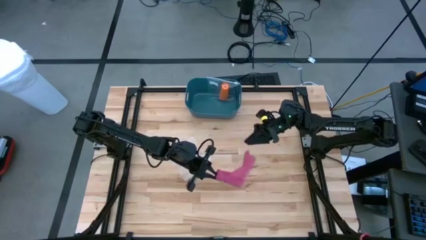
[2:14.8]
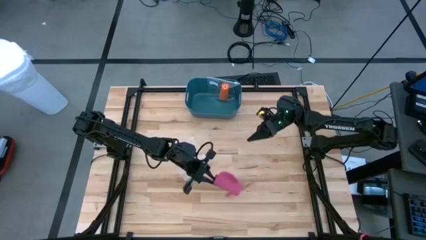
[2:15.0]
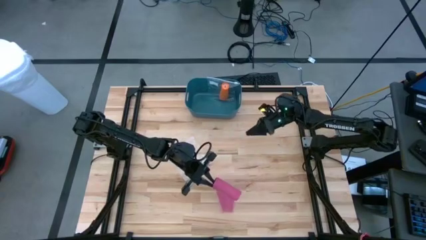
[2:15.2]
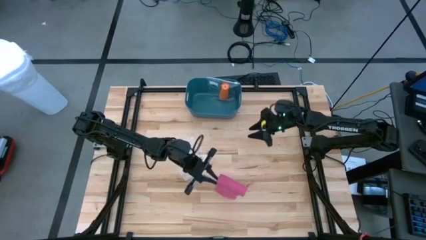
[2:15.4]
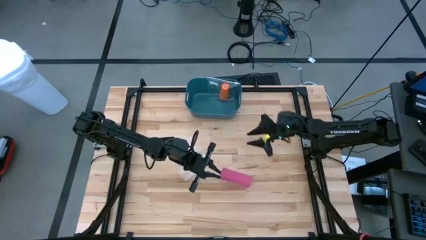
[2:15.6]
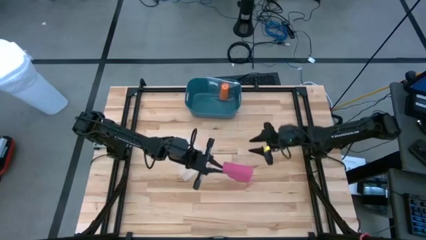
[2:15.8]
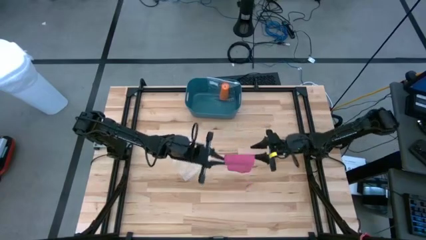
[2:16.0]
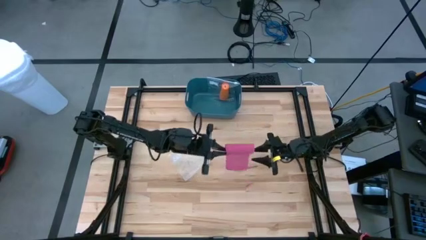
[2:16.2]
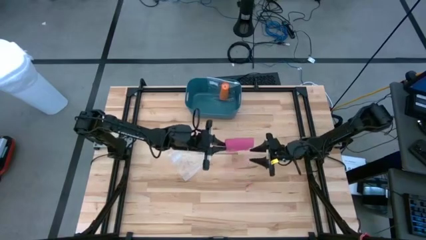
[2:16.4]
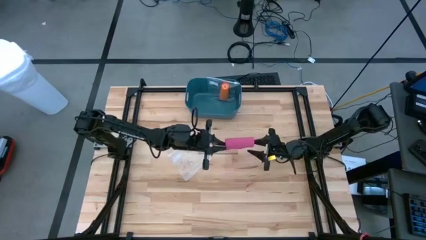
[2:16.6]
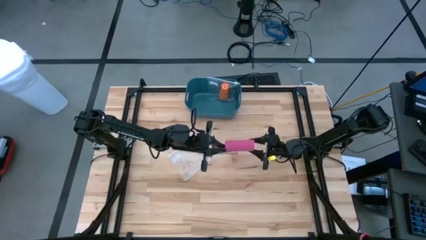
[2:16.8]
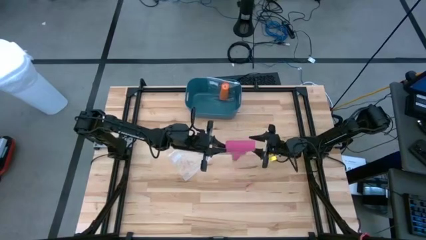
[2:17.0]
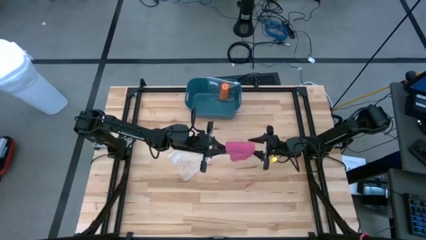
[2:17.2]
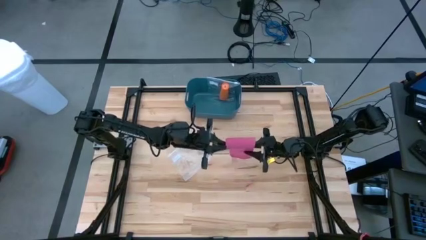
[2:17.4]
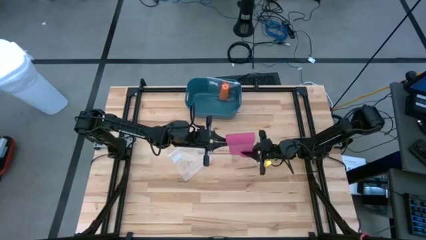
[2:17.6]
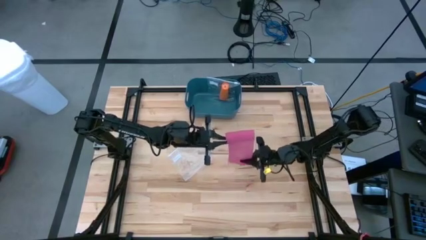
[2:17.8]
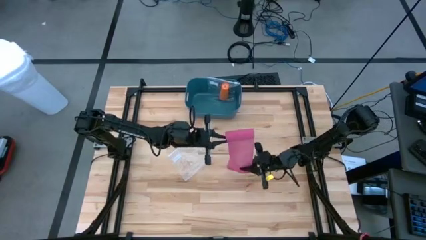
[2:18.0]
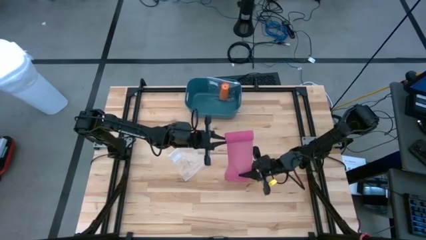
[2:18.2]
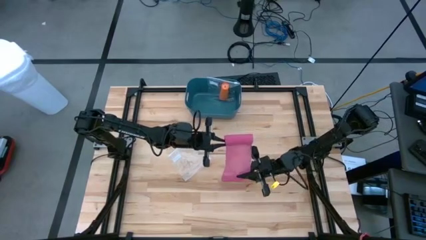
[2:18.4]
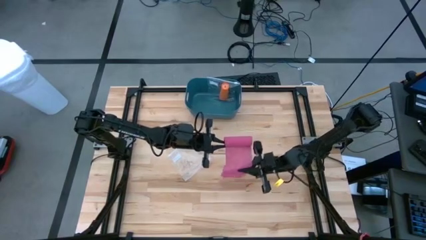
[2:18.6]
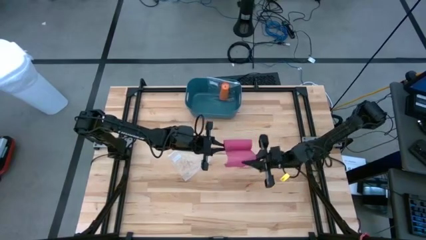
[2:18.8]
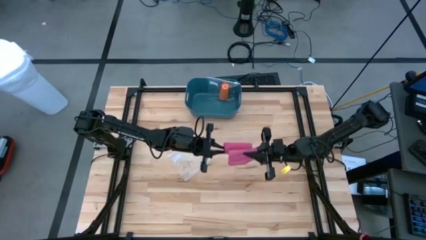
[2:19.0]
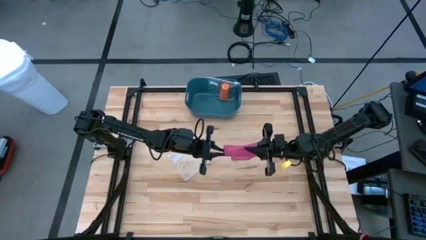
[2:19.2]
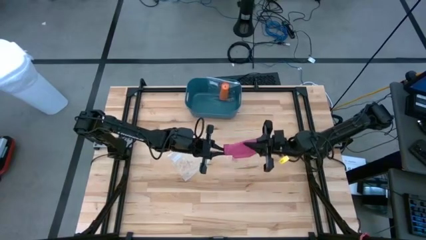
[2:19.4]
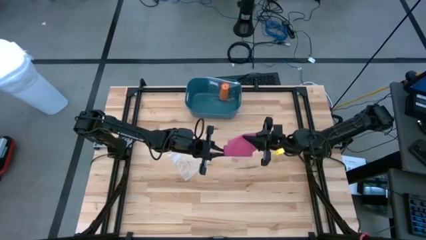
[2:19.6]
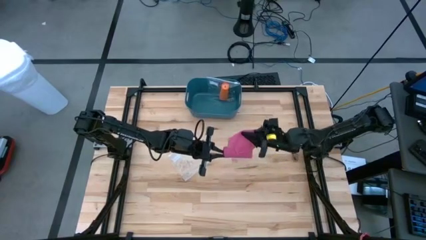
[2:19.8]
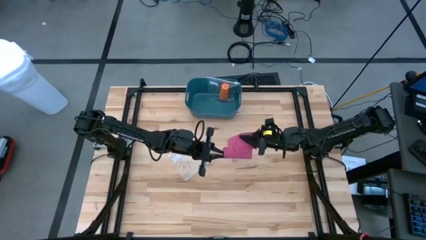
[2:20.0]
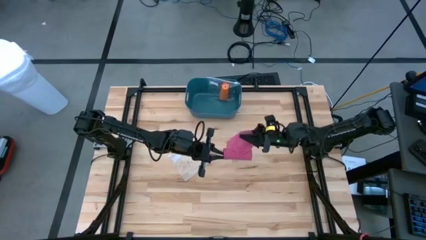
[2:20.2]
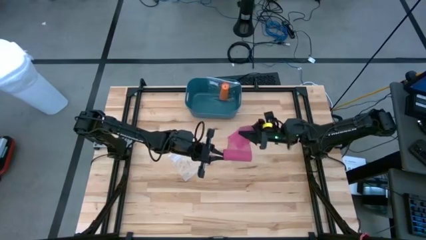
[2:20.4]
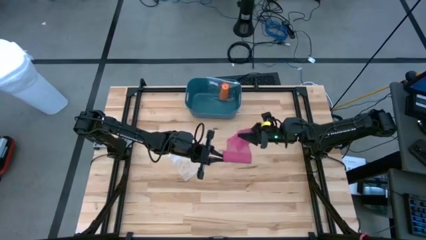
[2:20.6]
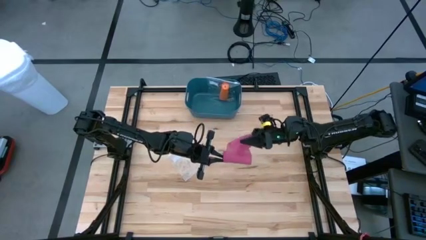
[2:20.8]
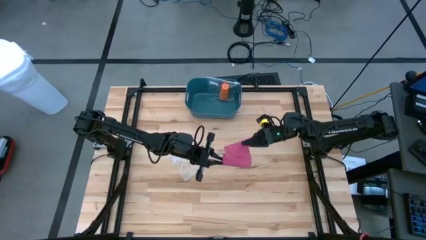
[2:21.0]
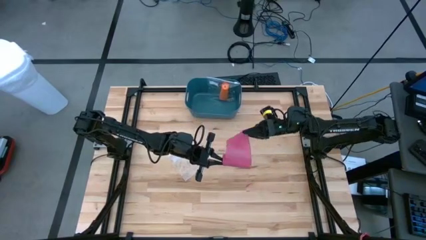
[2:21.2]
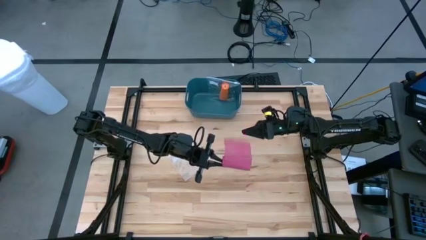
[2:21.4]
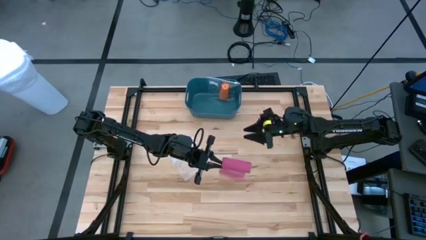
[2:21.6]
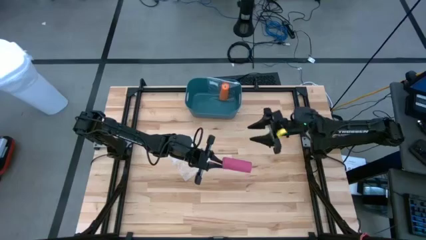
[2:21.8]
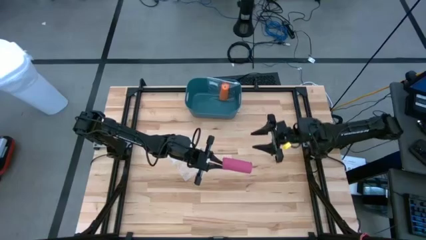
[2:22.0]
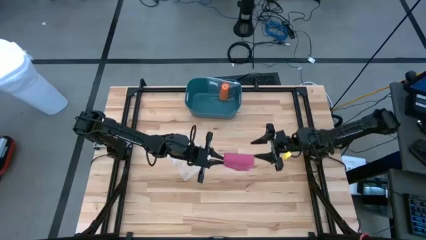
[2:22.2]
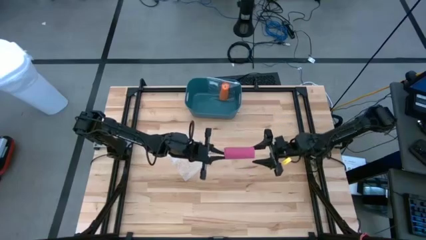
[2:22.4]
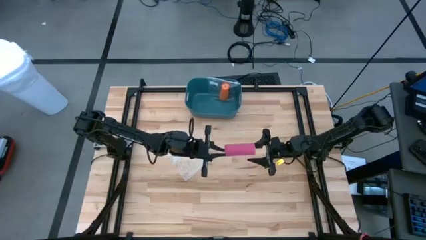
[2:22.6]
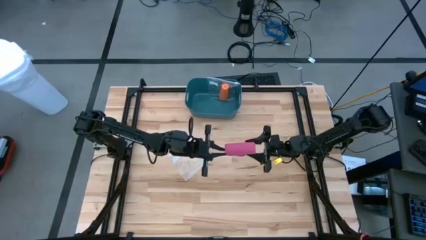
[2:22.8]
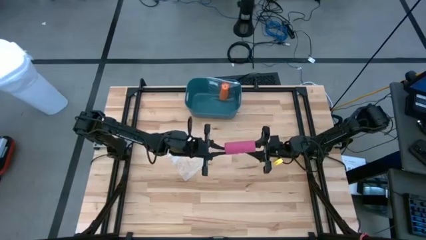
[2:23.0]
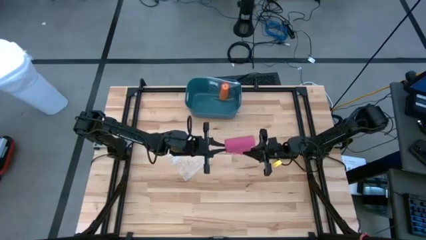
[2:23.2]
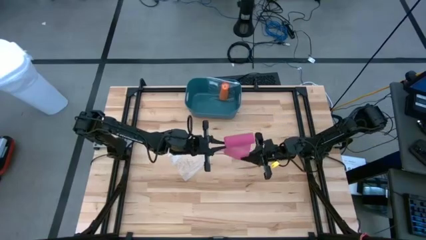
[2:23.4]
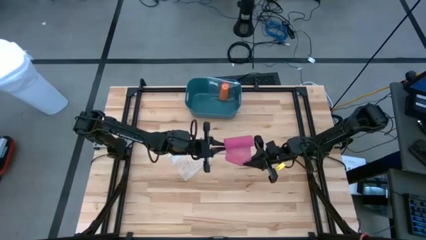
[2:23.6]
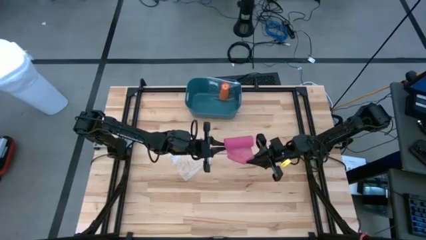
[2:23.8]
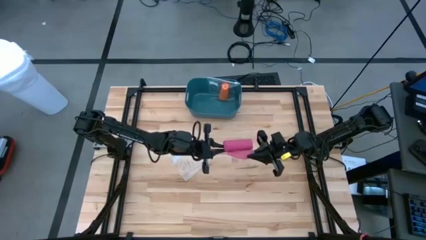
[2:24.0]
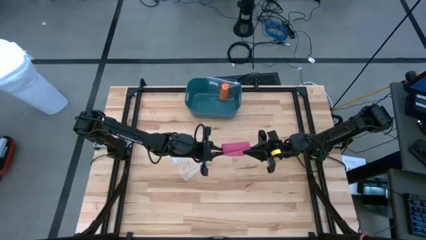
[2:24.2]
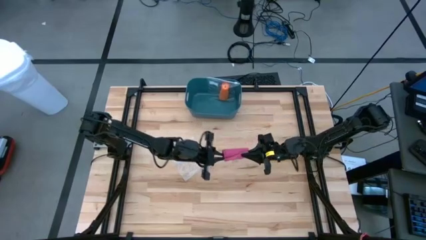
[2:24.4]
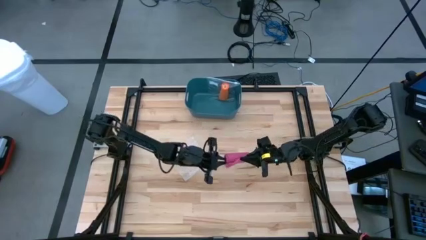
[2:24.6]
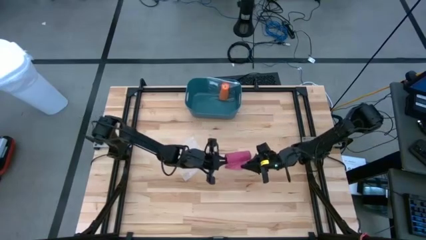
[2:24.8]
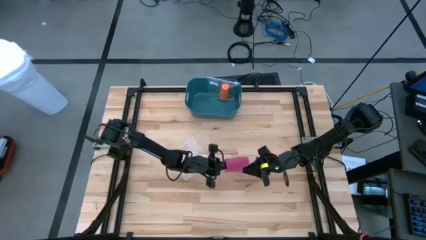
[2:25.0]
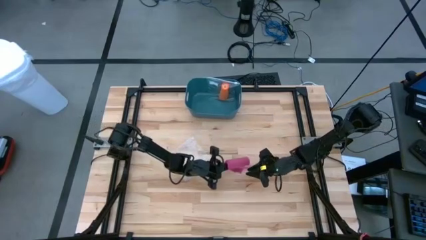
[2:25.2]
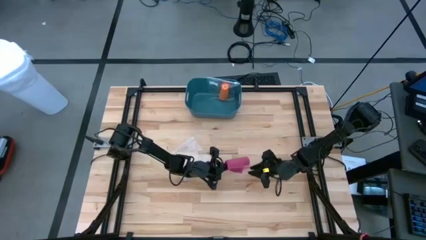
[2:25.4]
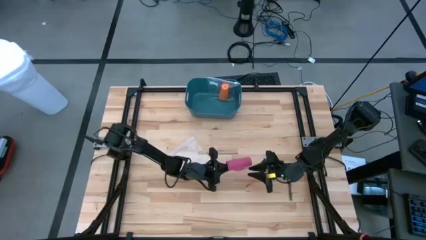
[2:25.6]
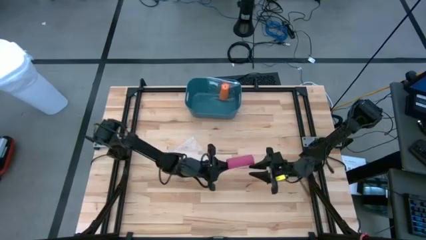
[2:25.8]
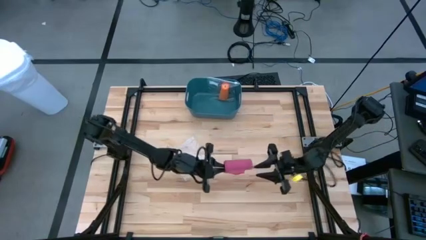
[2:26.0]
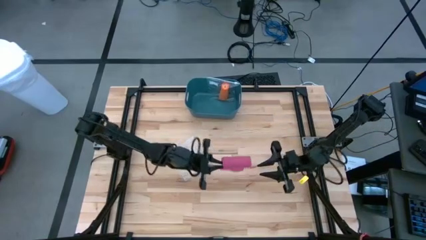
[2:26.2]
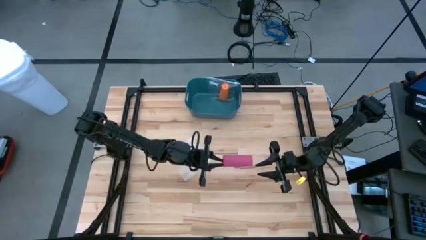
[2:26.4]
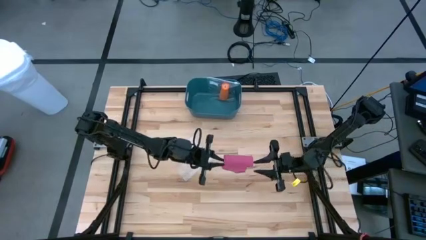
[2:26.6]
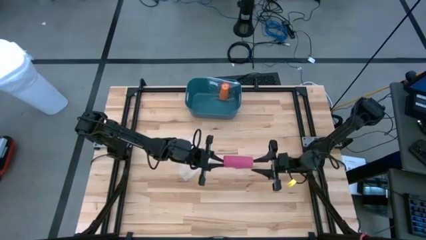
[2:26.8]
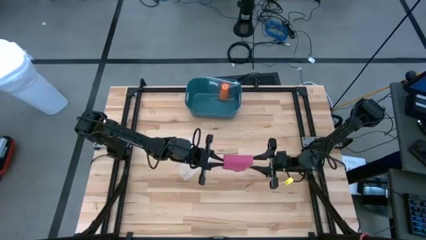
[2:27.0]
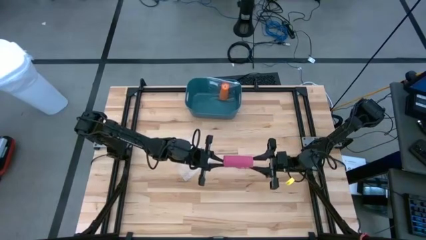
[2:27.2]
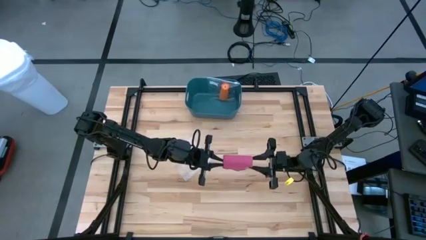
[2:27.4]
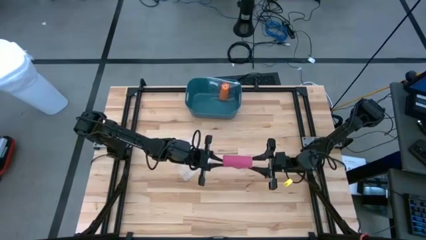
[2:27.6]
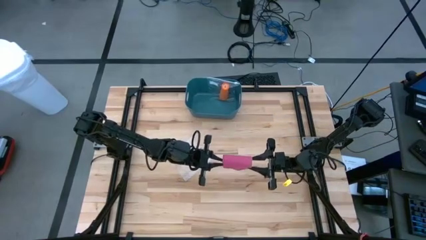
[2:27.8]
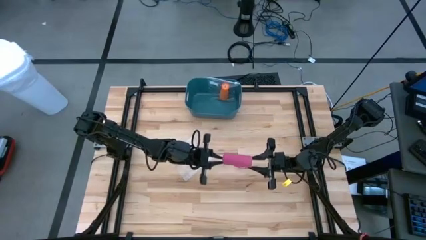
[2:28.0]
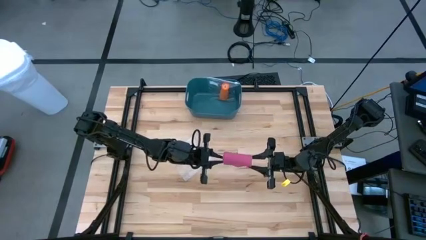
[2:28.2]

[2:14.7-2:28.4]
Task: Roll bandage
Roll the pink bandage
